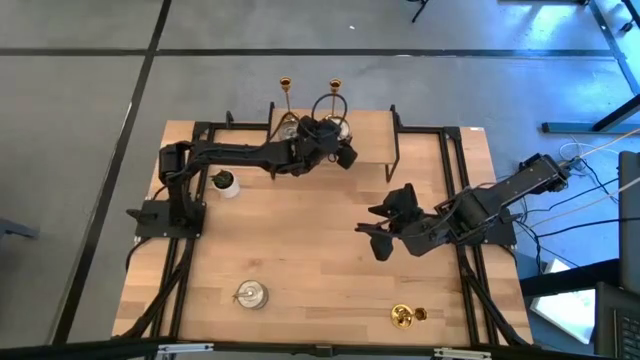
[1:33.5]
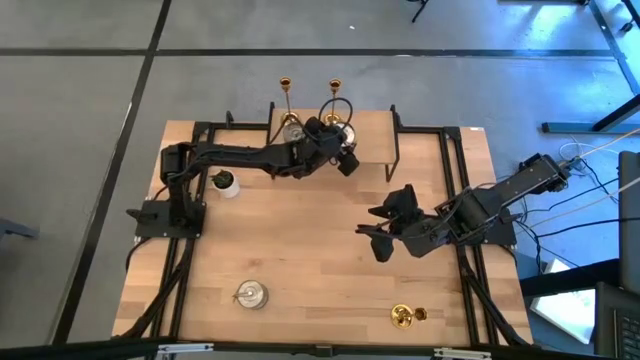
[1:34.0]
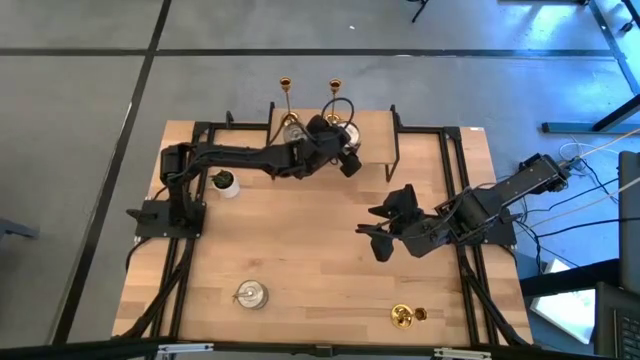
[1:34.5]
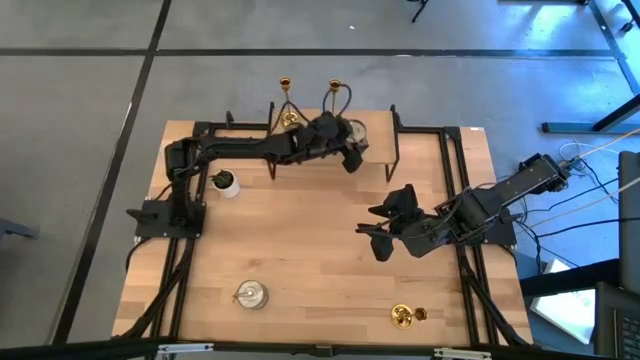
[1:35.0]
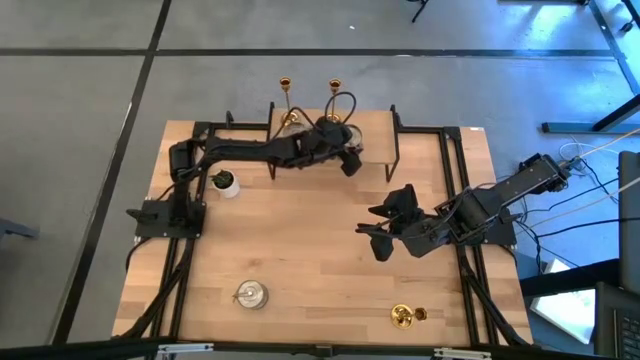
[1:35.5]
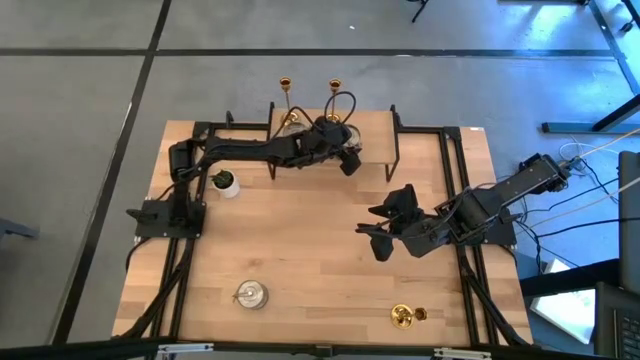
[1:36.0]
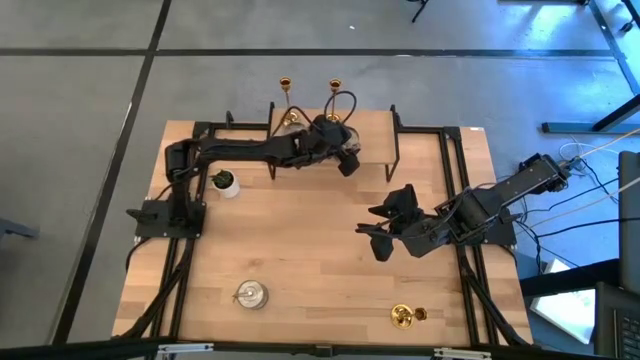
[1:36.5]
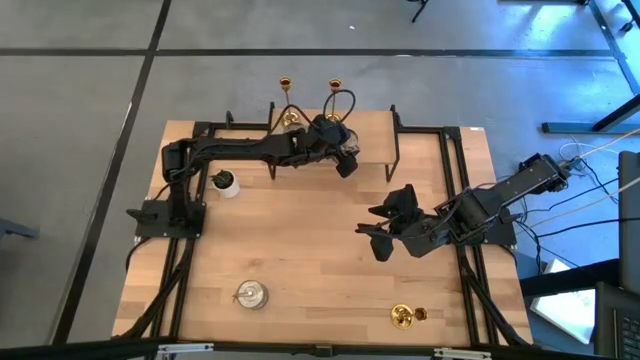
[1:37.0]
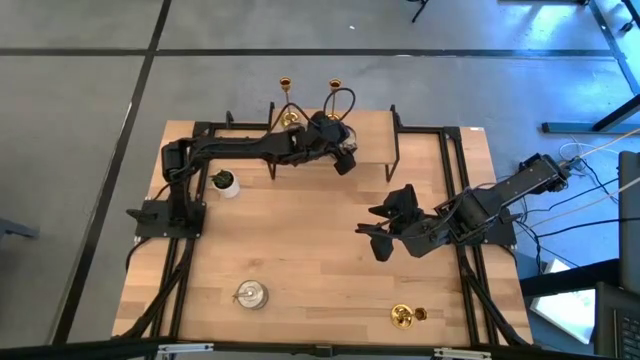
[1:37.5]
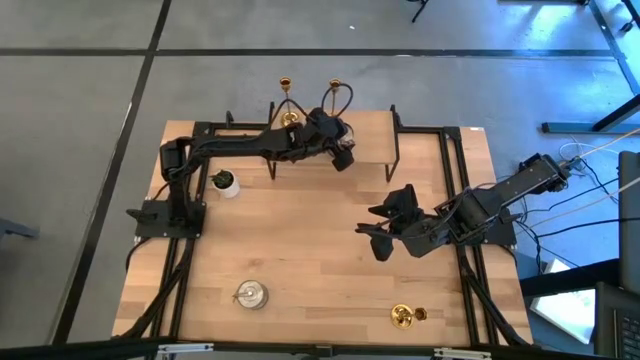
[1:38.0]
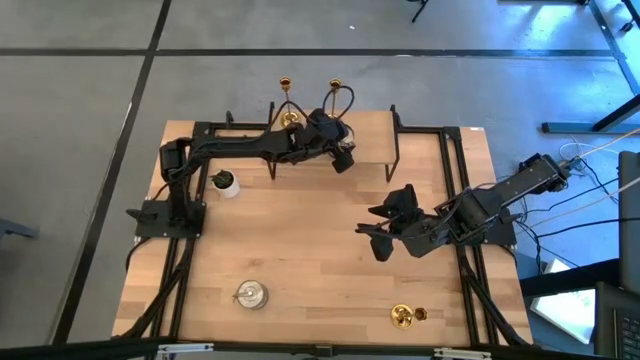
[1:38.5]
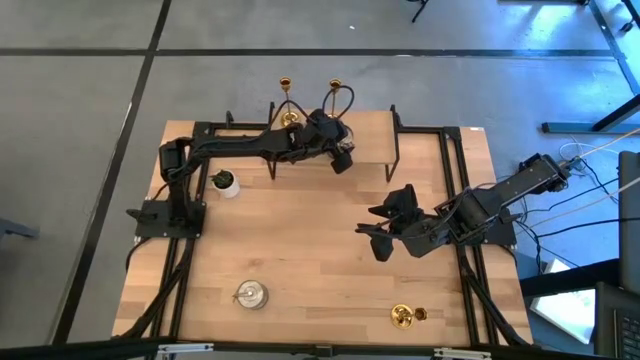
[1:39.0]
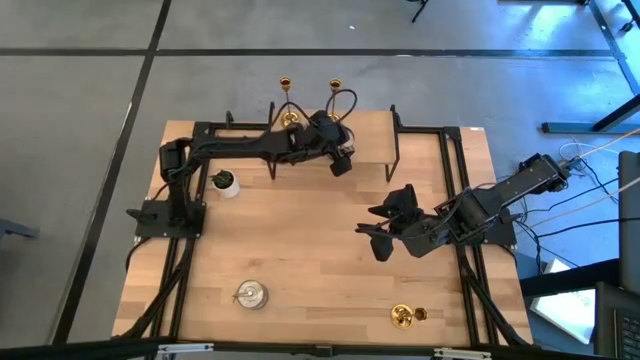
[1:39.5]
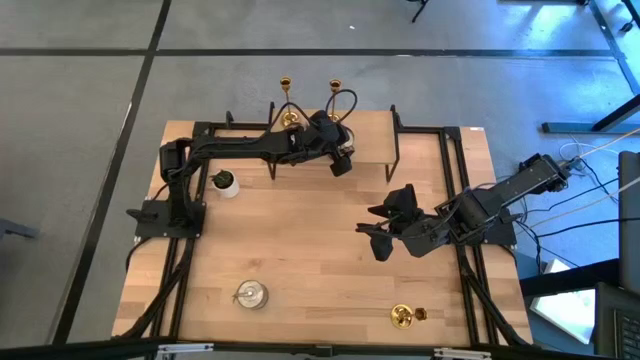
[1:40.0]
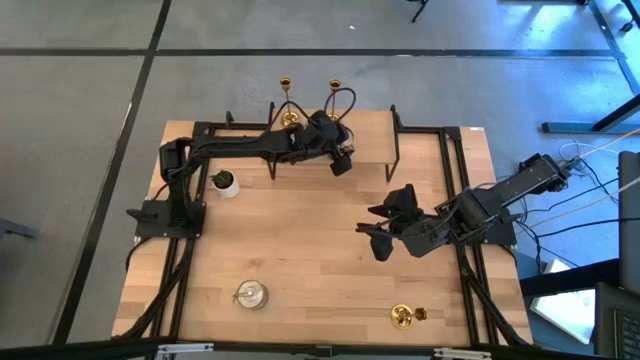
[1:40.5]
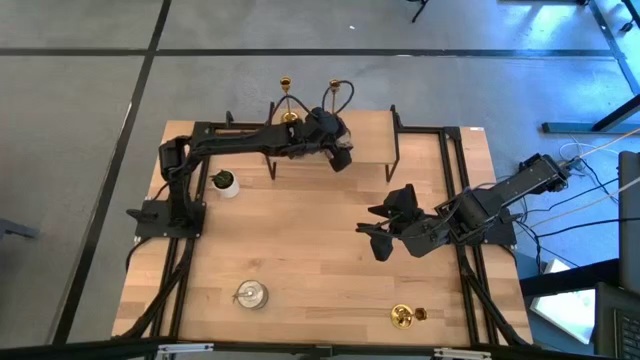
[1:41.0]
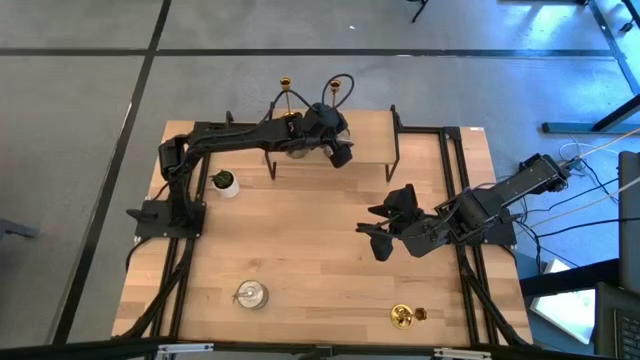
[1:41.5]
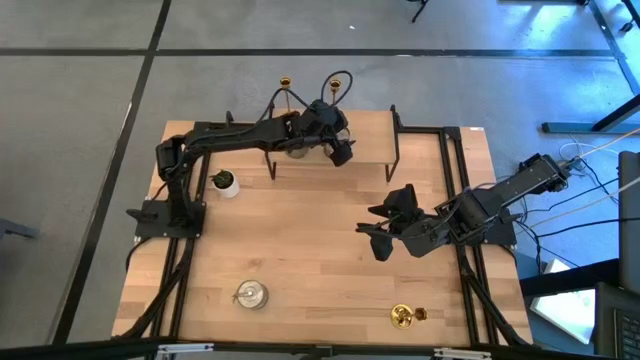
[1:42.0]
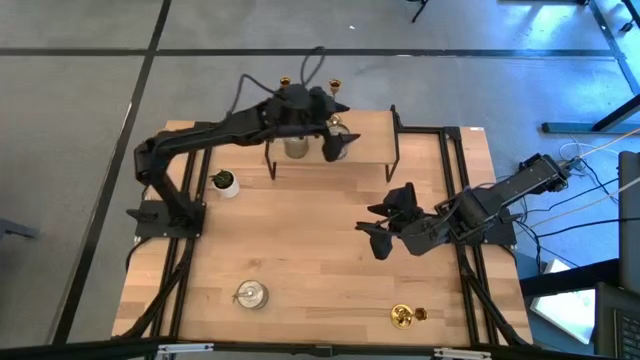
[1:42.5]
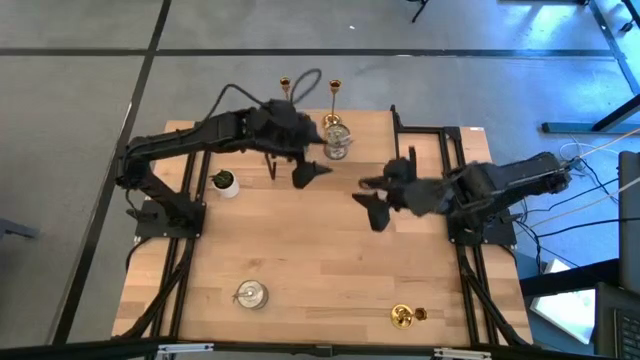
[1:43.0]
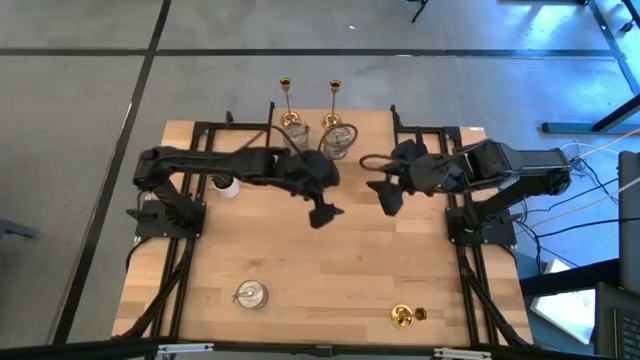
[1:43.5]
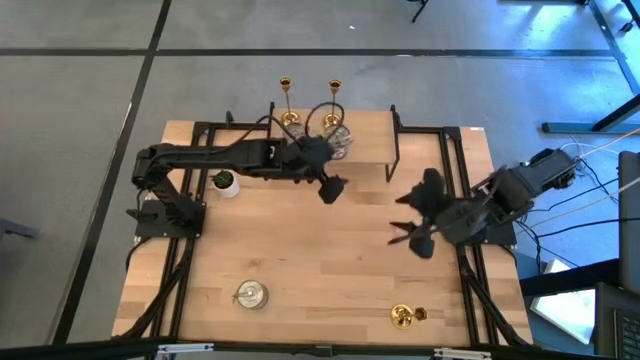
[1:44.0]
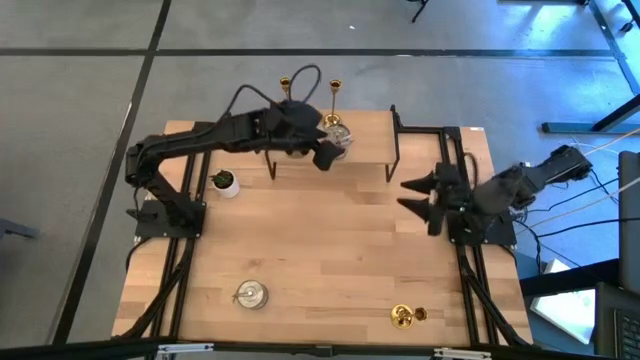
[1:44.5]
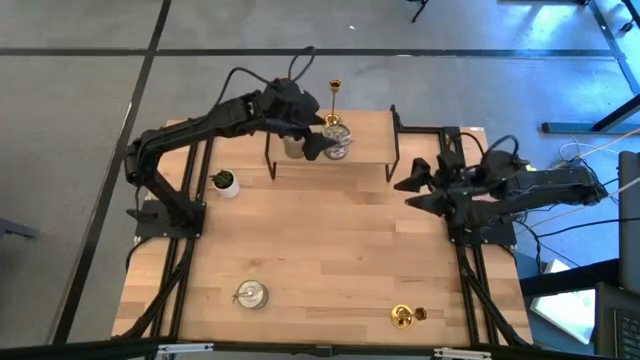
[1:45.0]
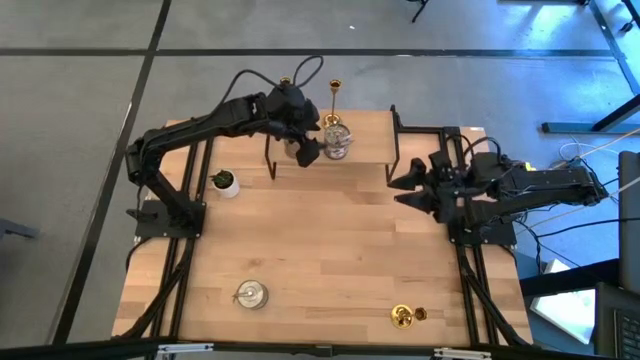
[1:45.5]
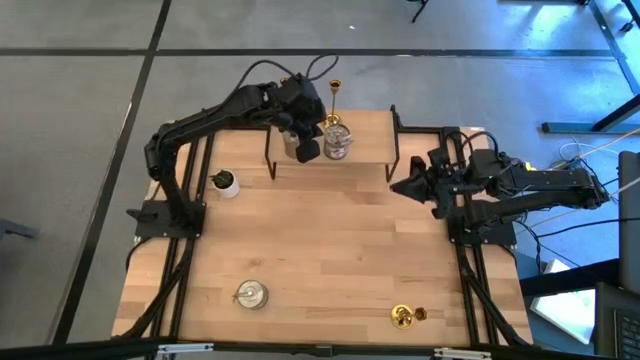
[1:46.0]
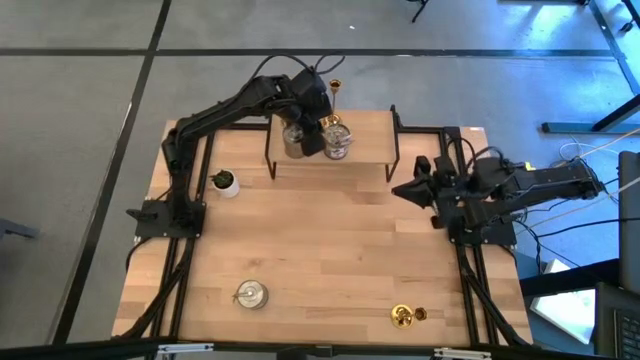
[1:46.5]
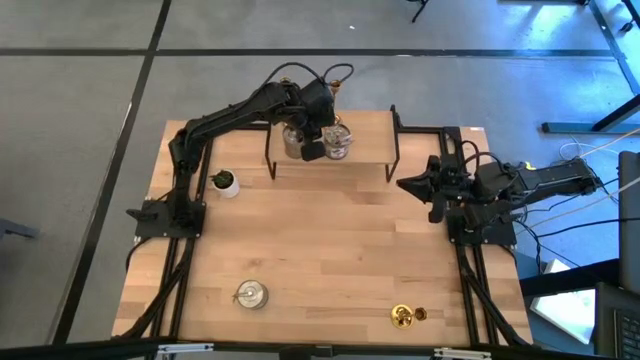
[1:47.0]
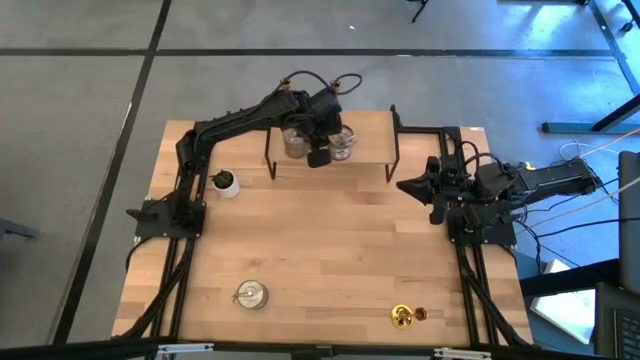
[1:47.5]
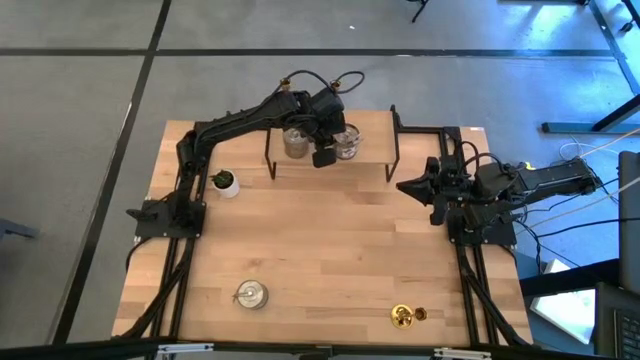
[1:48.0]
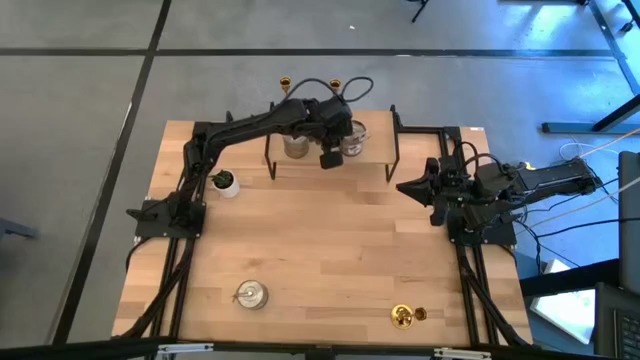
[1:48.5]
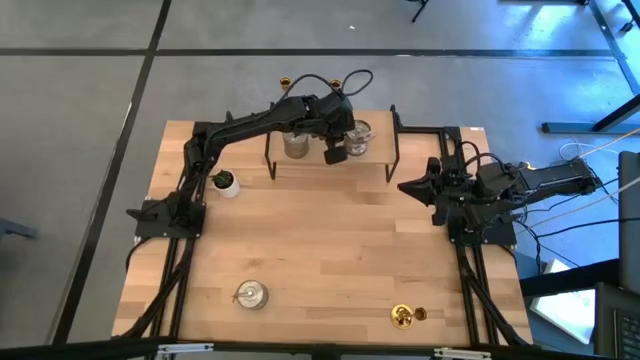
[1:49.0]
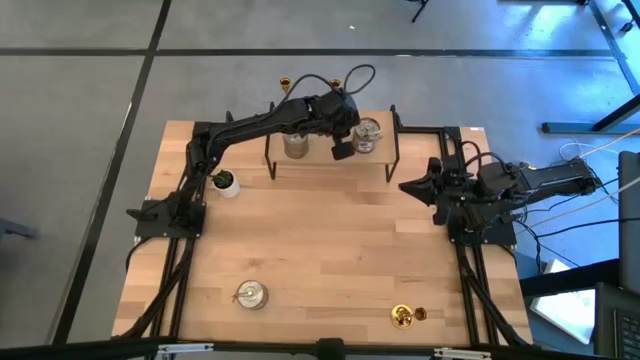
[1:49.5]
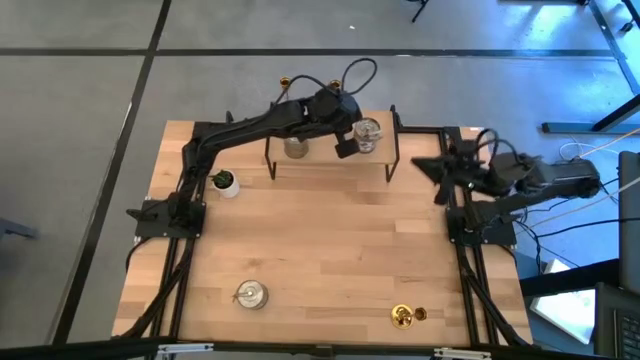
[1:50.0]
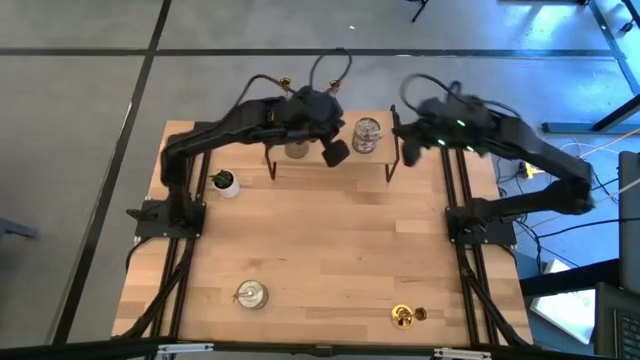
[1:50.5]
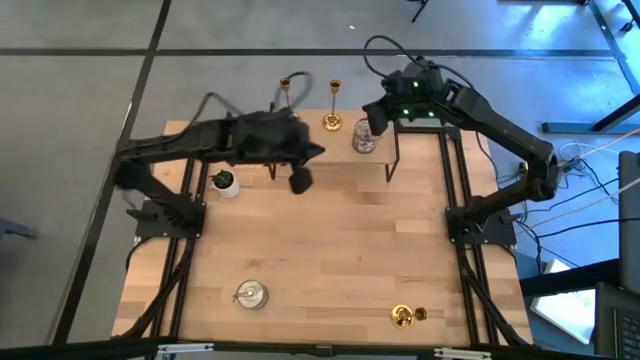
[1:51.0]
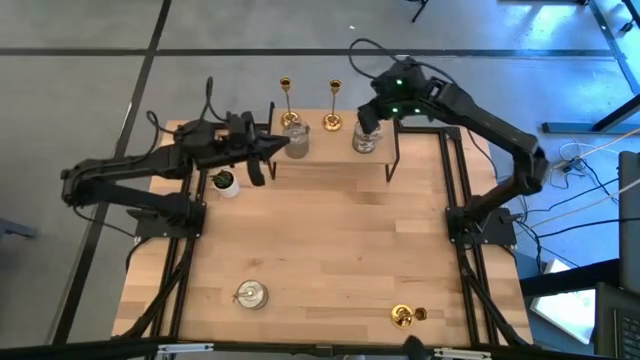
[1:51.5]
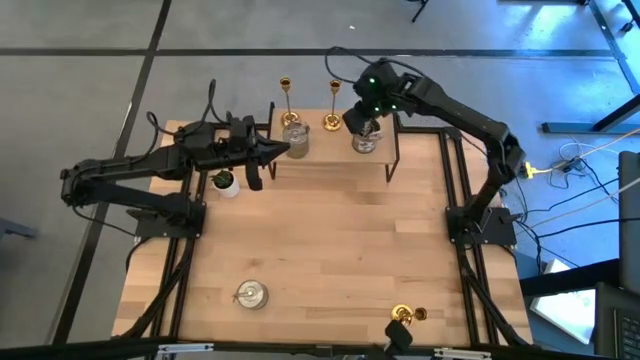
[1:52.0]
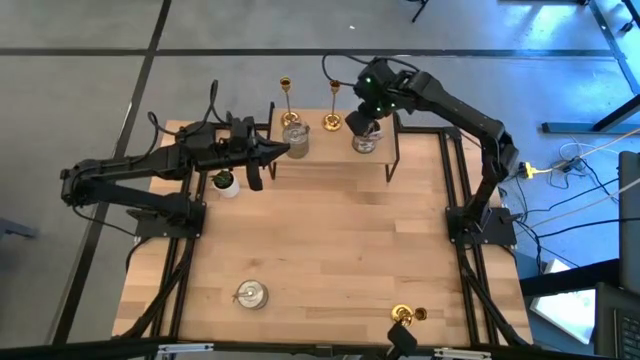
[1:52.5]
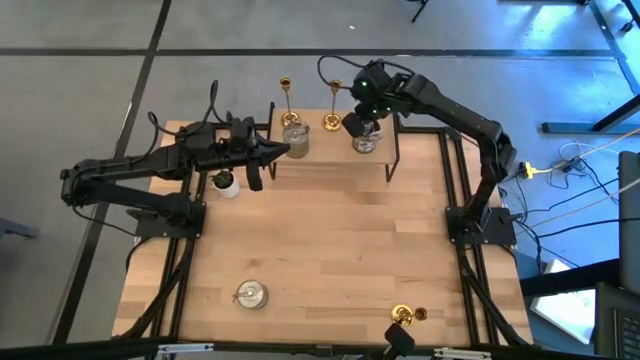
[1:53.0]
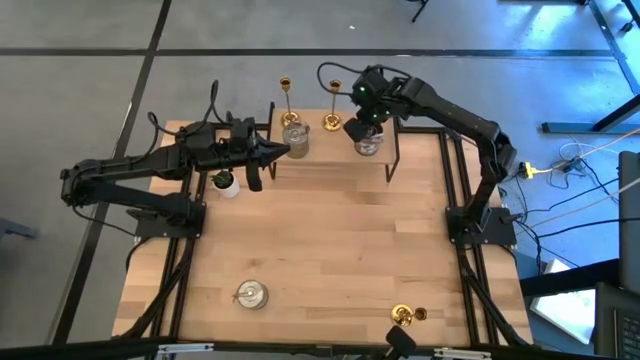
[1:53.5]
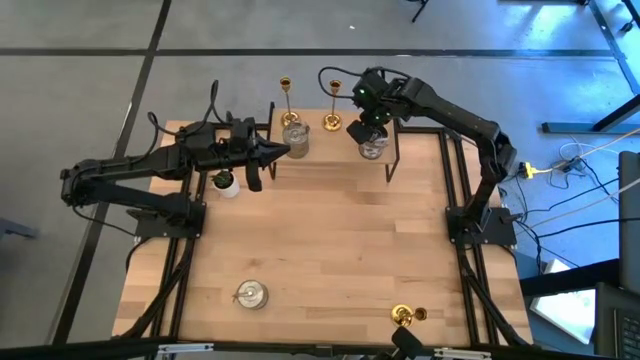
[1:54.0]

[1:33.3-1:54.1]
Task: Pick & Place candle stick holders
Put the top silver scented candle on the shelf aligned with the other silver scented candle
